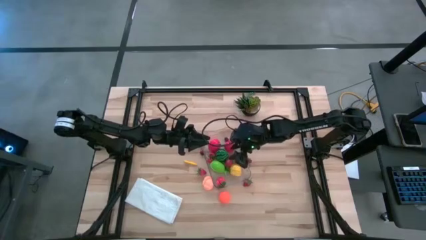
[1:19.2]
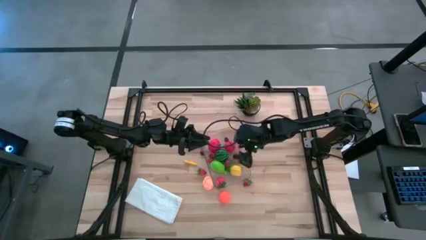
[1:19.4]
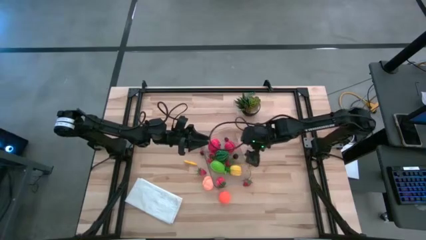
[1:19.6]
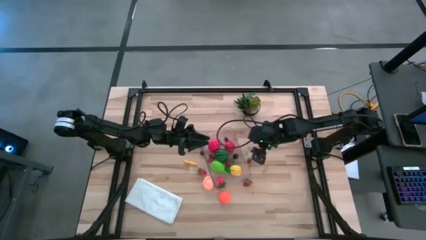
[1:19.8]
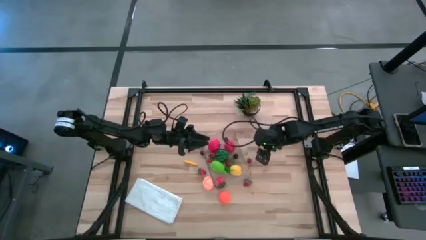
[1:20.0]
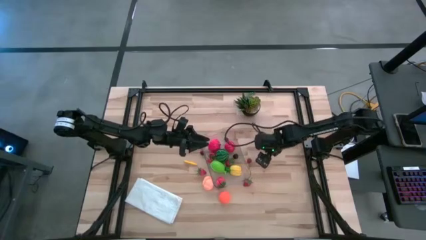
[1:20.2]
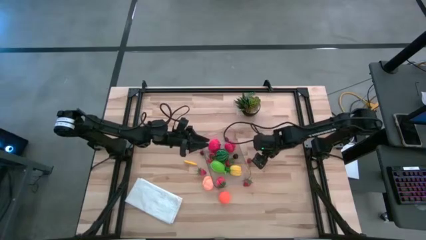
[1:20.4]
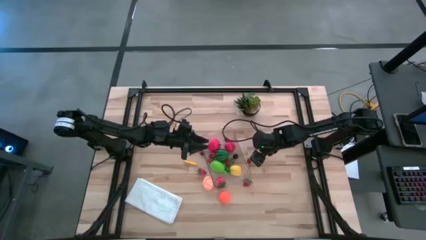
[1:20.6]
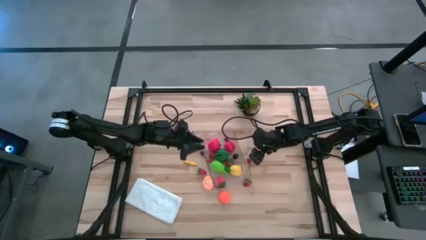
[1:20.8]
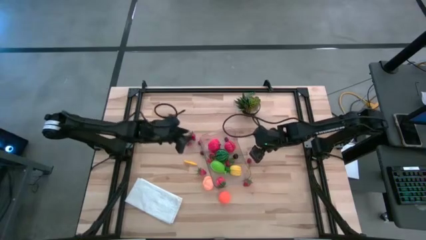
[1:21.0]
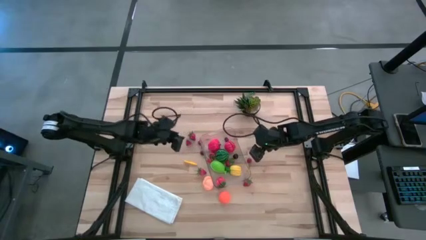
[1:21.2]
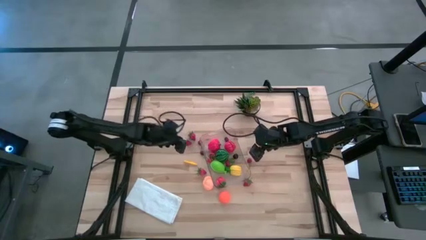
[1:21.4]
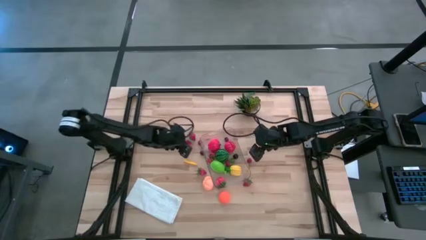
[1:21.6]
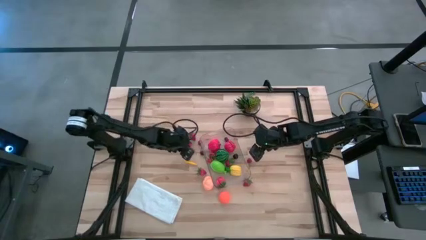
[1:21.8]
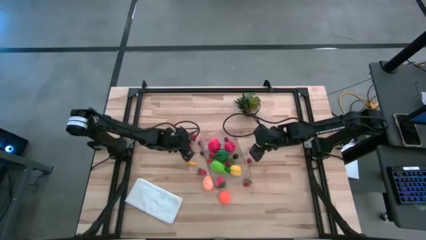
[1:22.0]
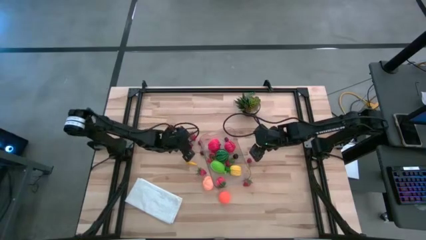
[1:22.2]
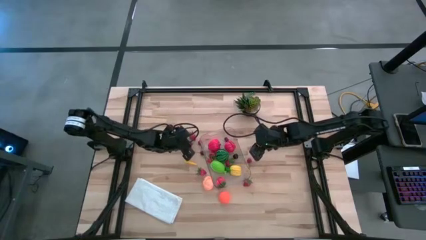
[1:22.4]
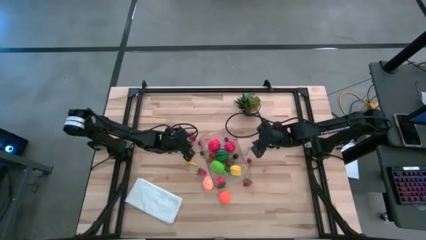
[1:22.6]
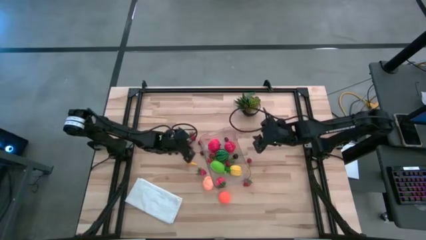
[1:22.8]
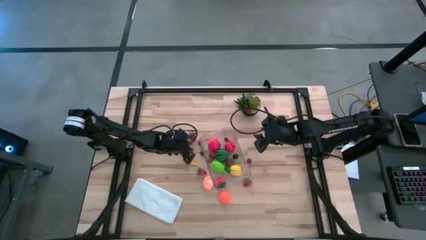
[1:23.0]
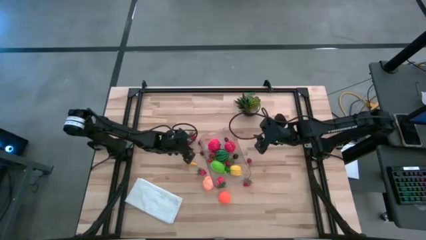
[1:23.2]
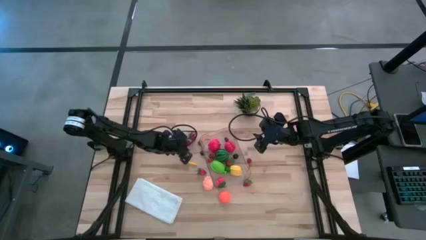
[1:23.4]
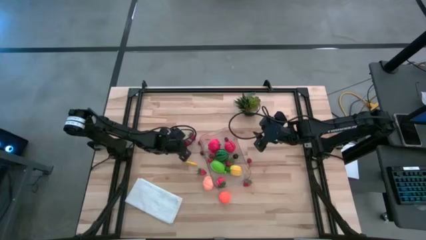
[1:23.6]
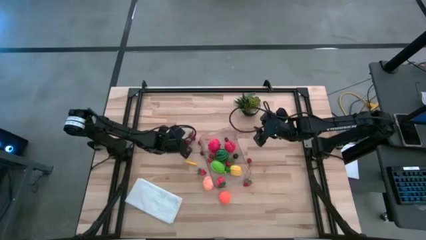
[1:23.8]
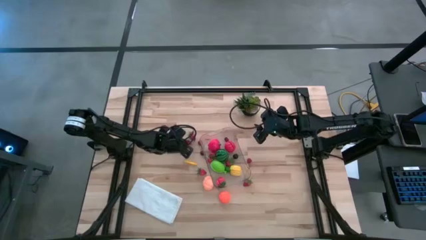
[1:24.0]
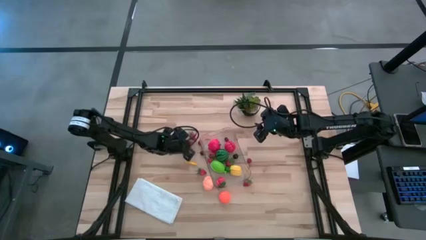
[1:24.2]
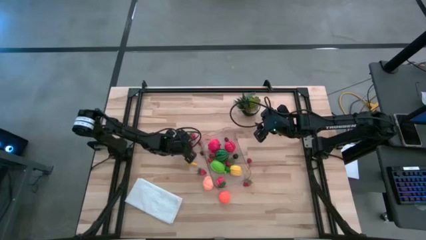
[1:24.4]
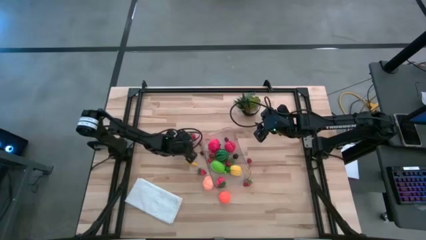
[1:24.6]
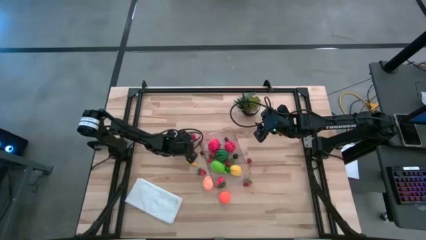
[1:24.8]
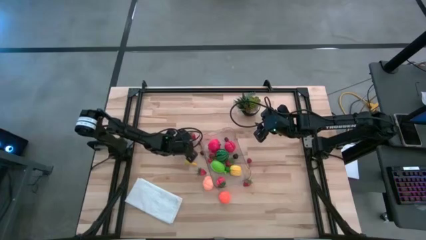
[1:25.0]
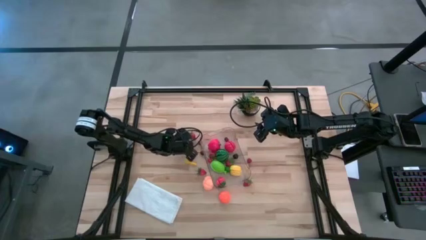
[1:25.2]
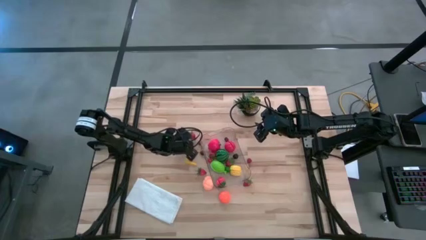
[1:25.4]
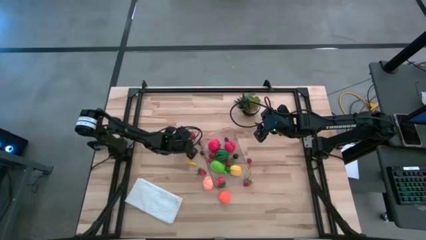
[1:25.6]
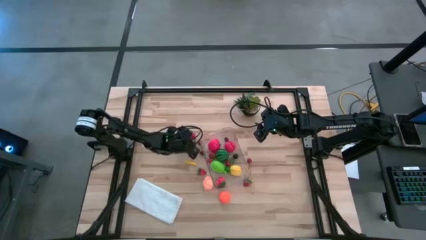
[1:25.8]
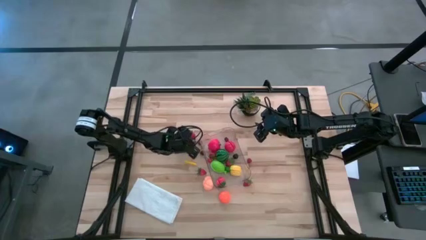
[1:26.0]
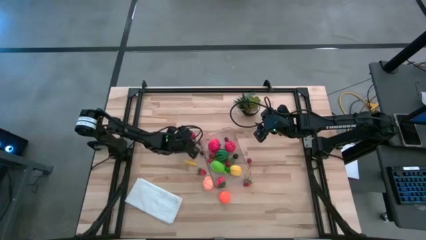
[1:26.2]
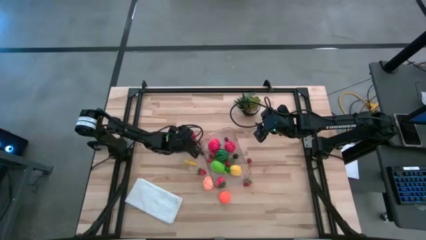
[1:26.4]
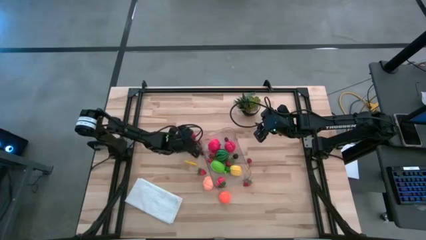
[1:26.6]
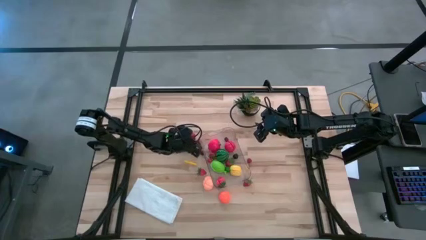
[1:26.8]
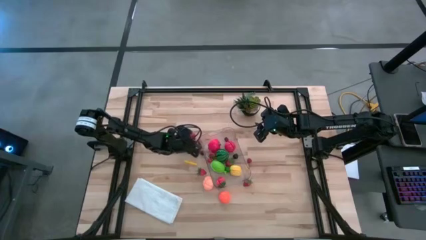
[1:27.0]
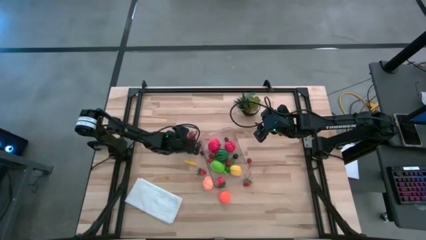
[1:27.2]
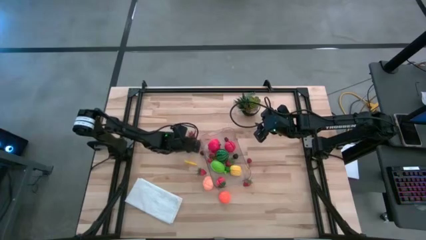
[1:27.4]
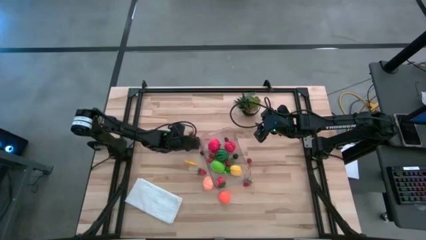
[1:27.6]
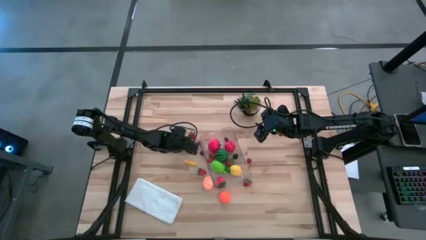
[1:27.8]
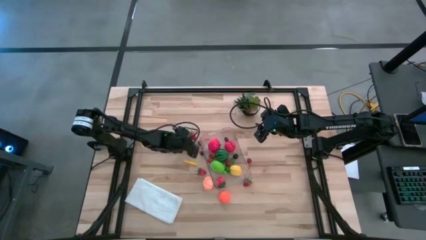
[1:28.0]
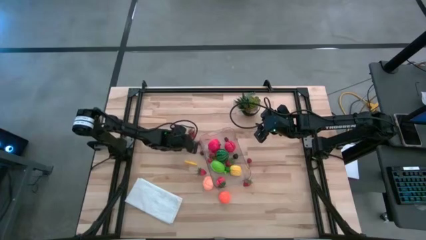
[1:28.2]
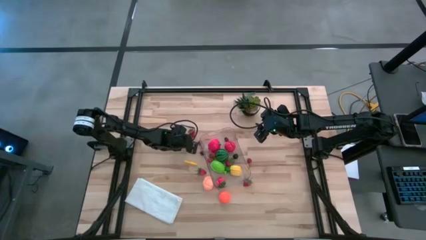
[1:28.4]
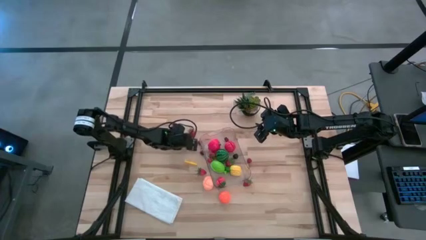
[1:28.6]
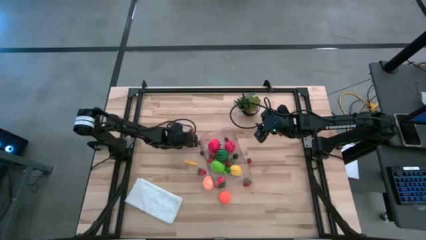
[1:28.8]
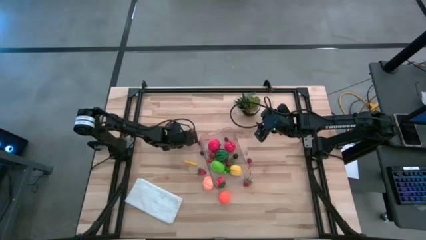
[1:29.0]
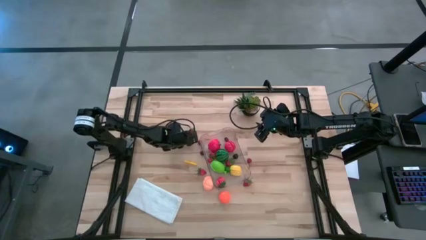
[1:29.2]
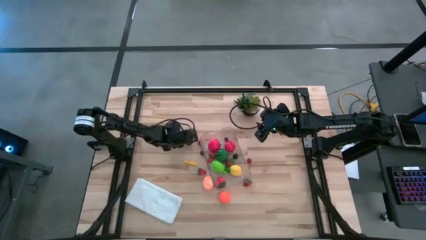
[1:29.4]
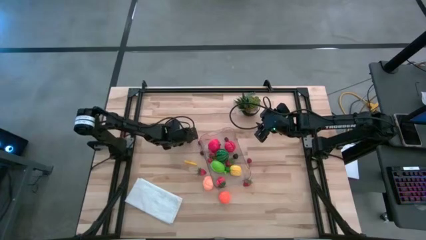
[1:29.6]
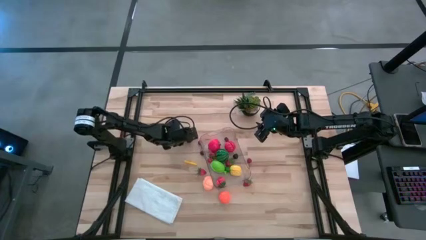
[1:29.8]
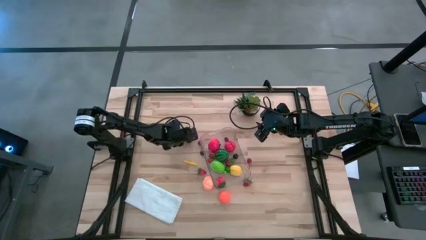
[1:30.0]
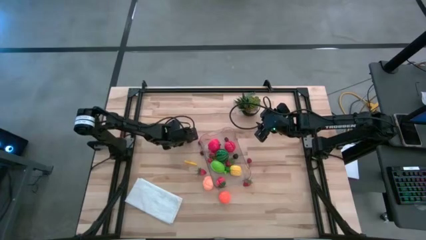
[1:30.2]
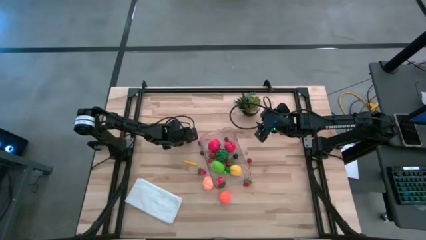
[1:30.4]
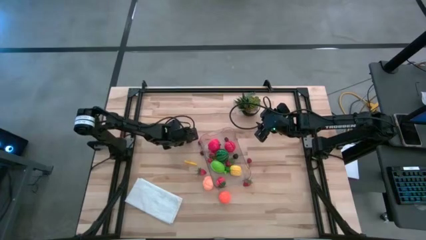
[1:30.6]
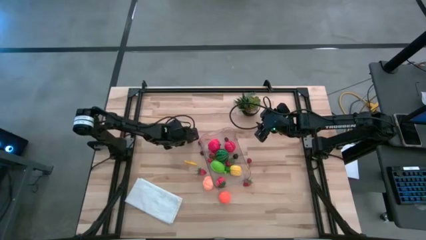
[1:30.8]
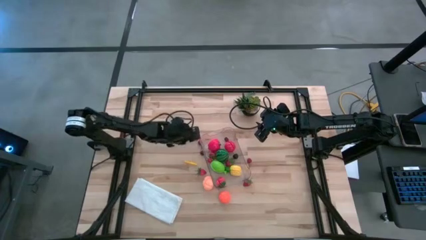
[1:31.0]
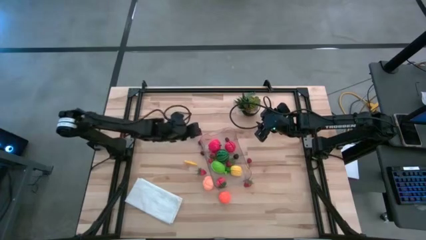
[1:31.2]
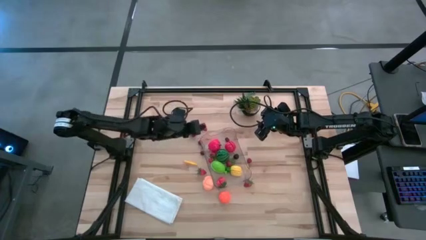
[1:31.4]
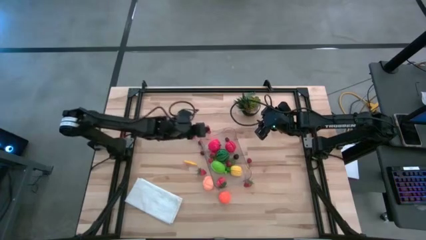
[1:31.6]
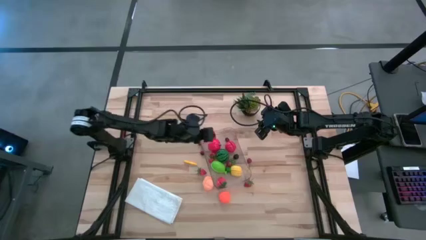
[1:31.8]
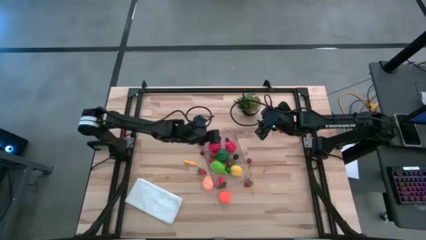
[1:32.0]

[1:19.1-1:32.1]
Task: Pick and placing Produce into tupperware
Put the red strawberry into the transparent bin
